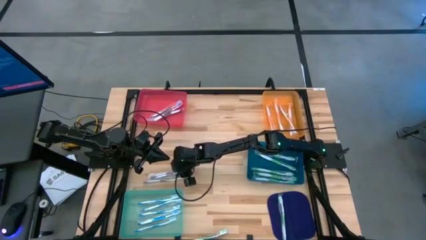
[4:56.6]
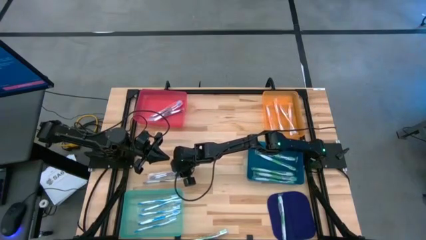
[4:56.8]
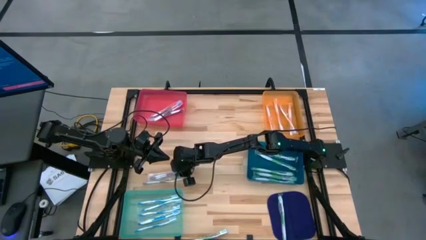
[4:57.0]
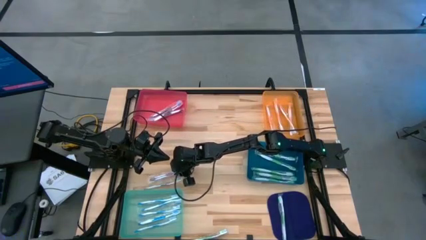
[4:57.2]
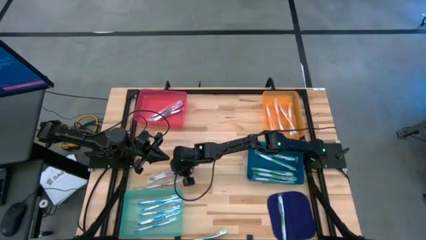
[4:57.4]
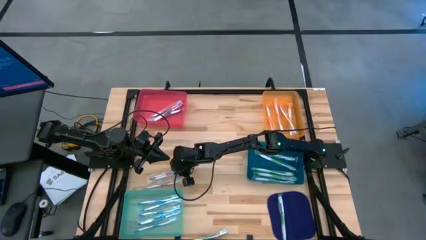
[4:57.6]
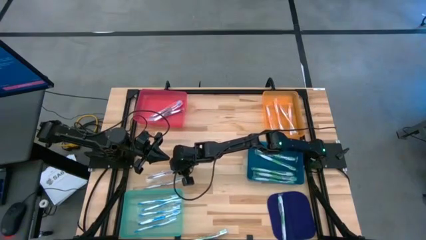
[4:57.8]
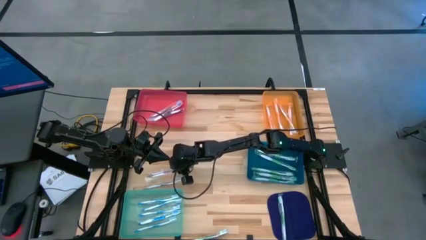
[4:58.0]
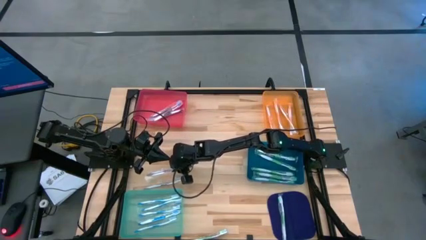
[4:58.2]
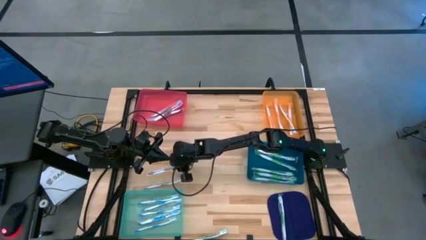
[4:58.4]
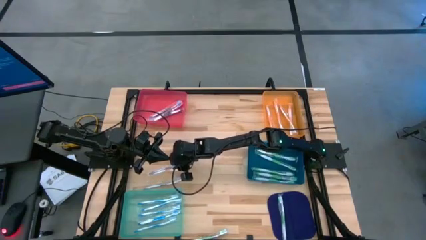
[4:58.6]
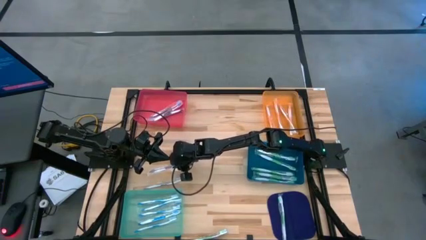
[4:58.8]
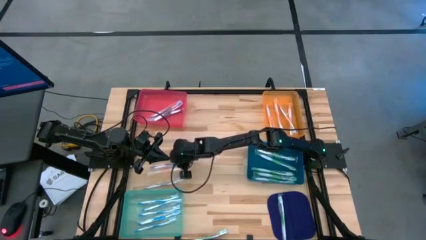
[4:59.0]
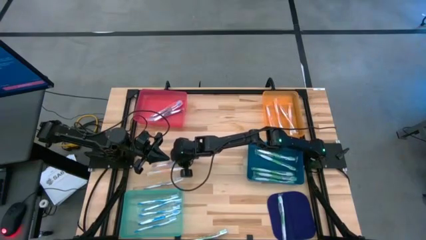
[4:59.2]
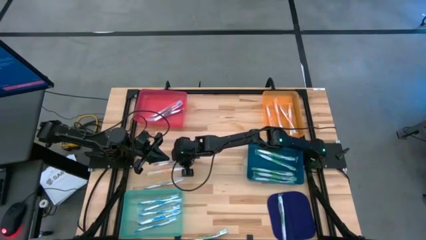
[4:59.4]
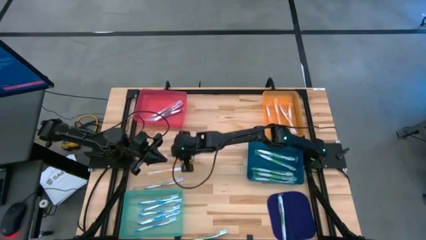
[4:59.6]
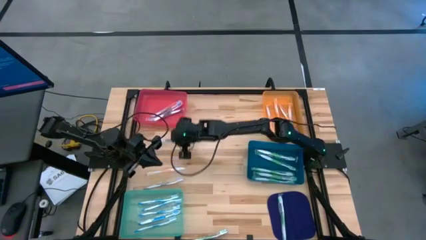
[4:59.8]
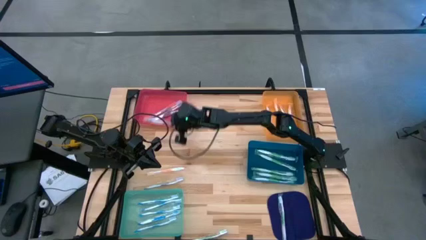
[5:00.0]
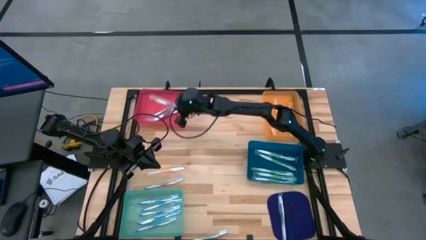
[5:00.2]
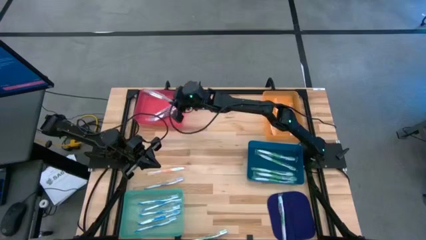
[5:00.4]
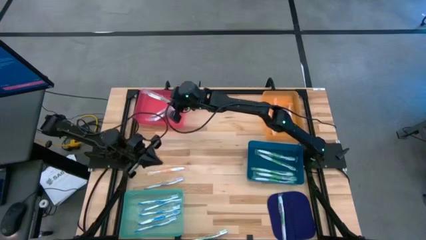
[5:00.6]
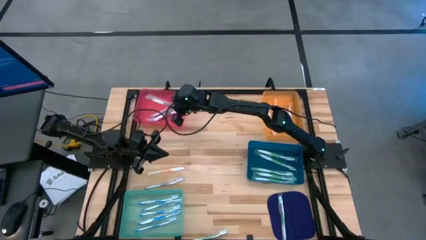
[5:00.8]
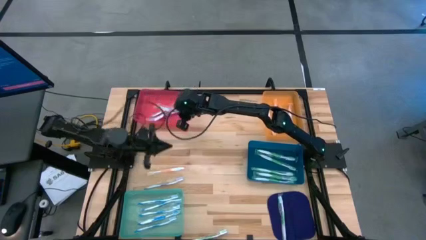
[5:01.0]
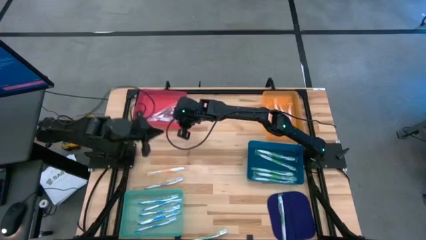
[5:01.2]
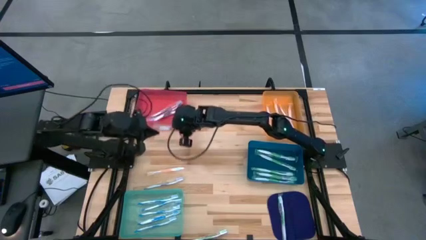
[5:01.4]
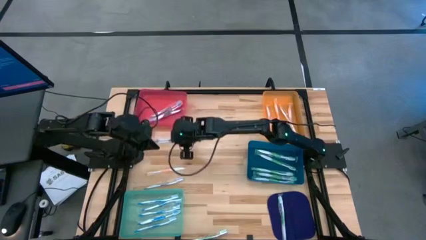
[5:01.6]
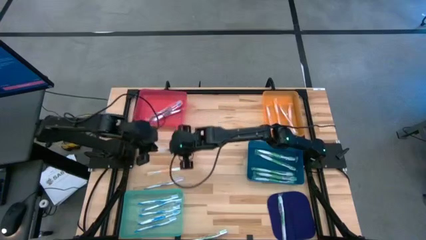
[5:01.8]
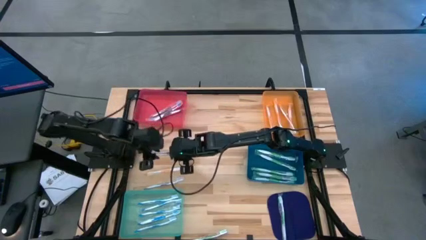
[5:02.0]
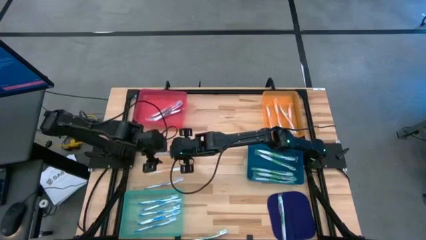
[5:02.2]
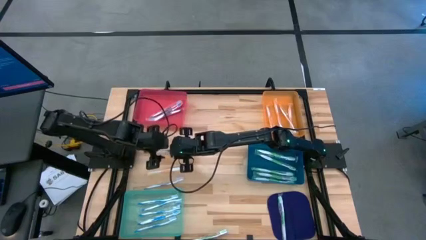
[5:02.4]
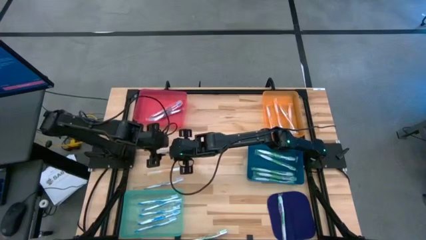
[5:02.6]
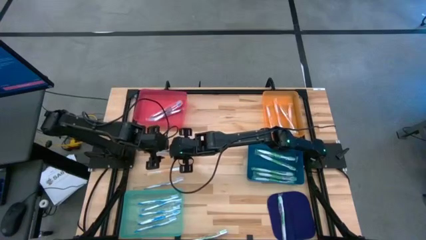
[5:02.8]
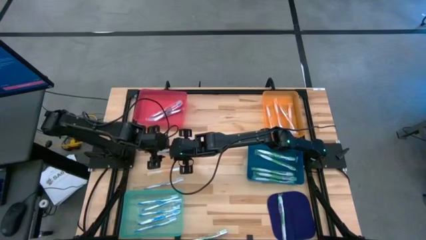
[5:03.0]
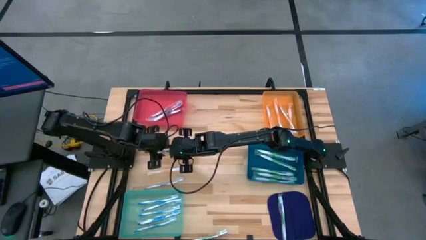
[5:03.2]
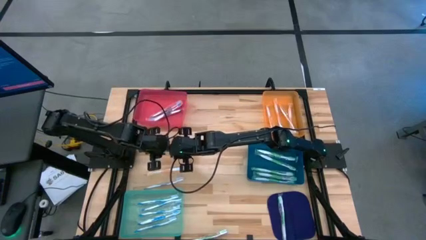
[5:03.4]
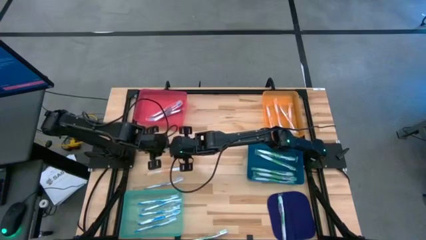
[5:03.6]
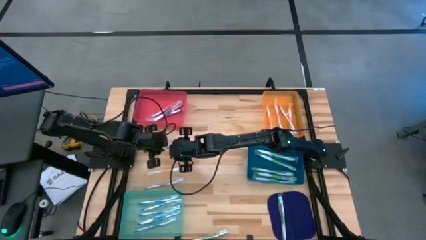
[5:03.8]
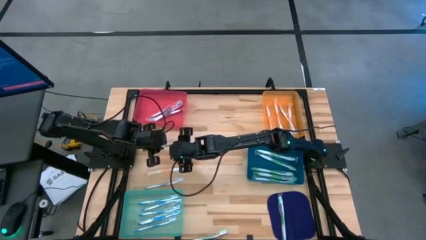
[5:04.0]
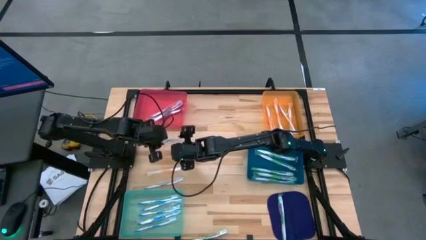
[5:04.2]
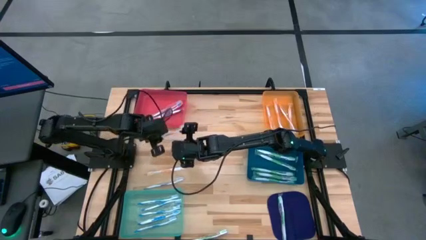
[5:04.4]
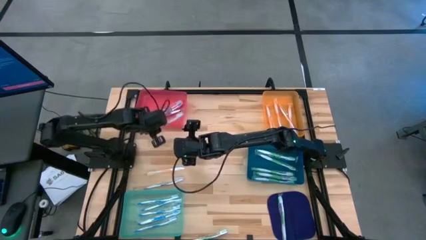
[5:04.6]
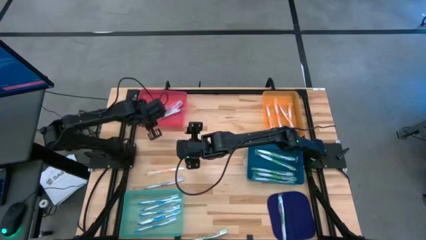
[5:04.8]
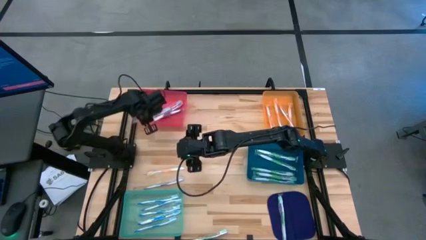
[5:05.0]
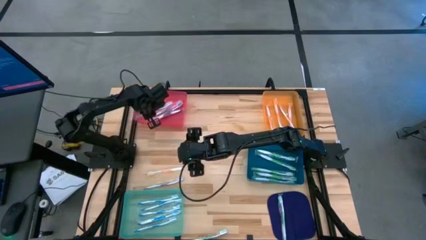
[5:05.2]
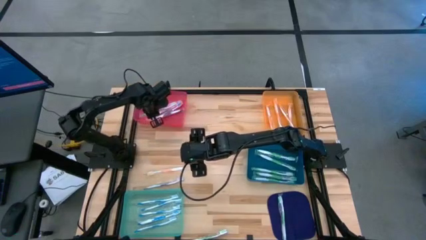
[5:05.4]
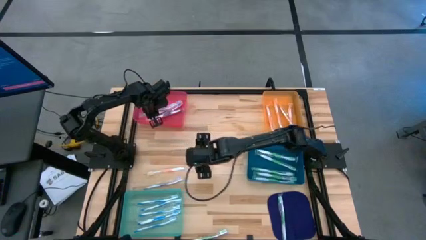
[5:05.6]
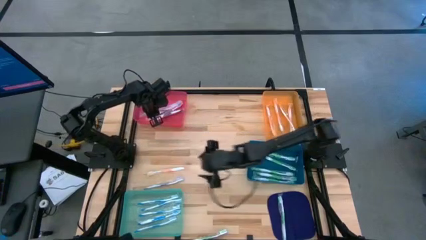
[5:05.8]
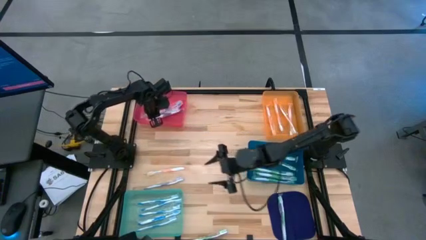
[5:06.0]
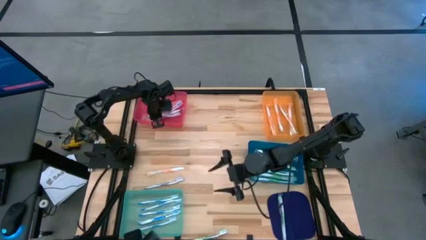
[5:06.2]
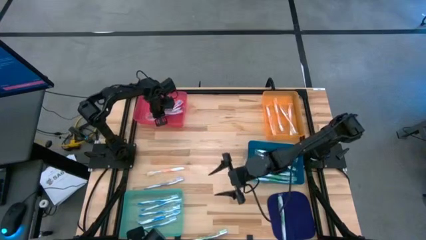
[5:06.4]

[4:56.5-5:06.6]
Task: Pick & Place Toothbrushes
Put the violet toothbrush into the pink bin

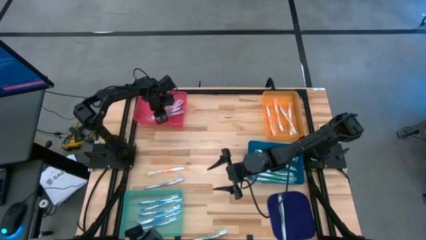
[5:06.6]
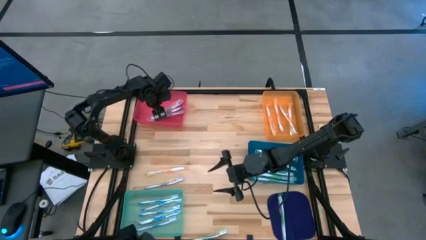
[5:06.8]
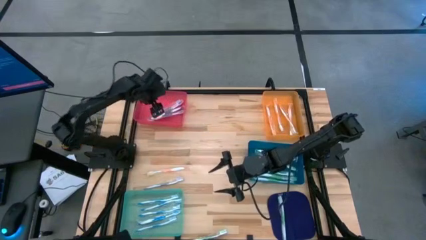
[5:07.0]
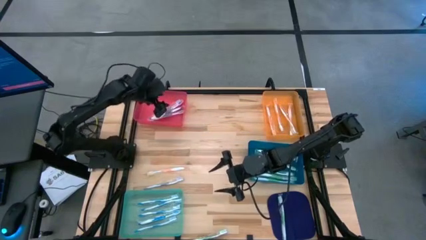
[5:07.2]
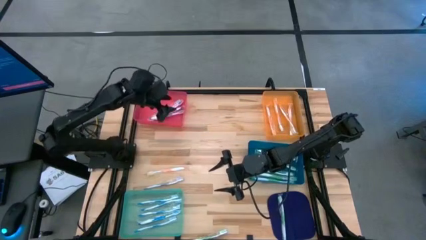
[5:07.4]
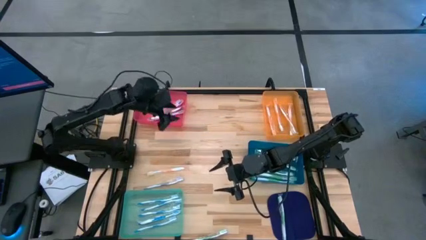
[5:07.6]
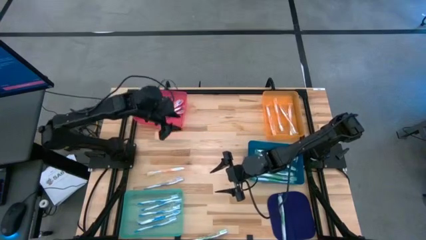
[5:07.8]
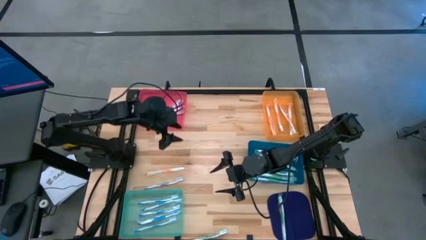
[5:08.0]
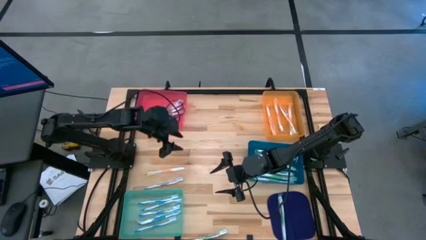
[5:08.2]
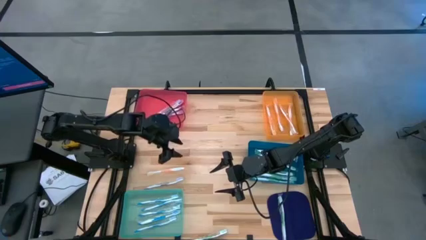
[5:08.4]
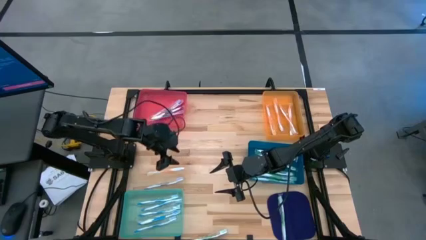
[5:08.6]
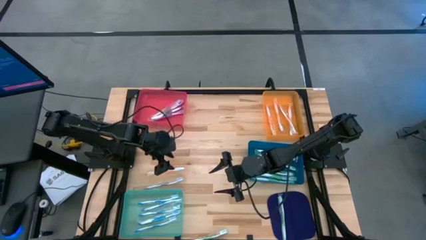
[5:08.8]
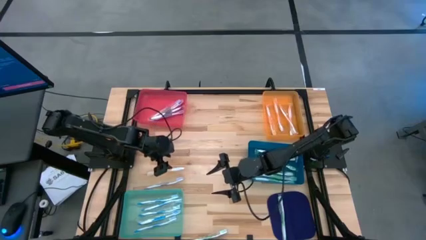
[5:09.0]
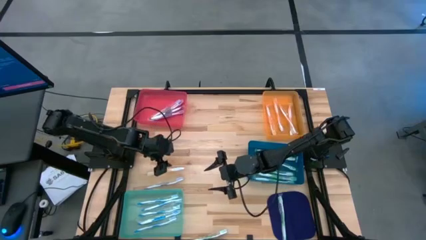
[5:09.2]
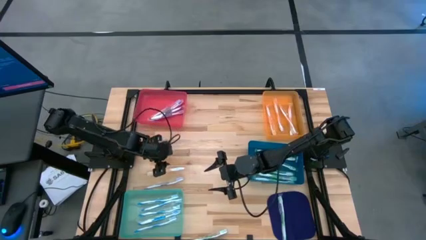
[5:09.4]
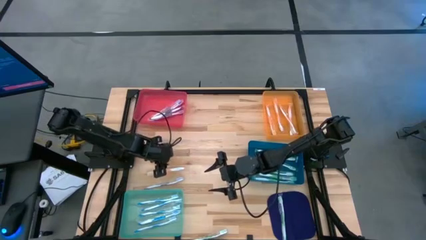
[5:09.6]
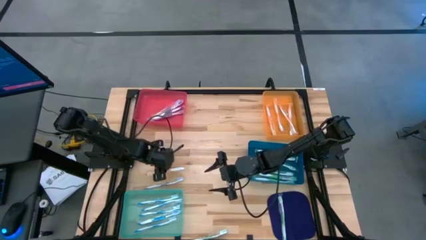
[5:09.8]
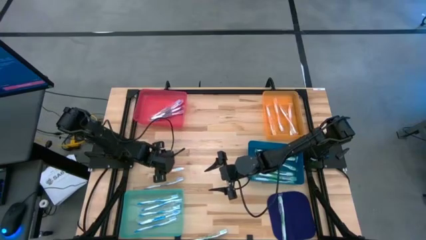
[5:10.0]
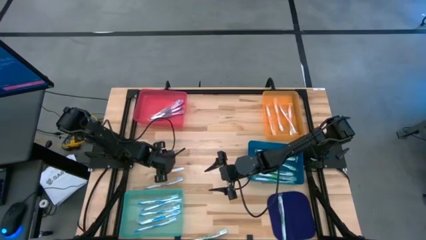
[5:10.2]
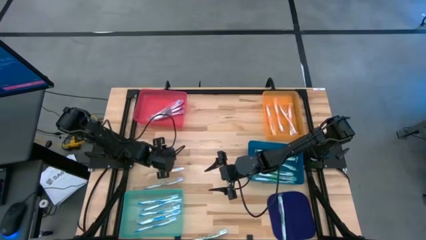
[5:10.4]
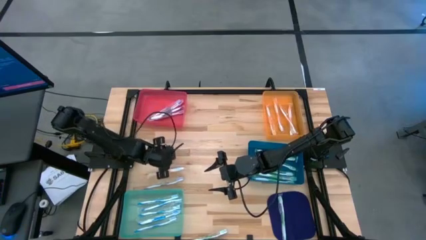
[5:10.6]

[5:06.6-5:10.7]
Put the orange toothbrush into the orange bin
